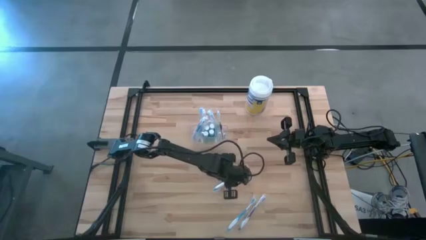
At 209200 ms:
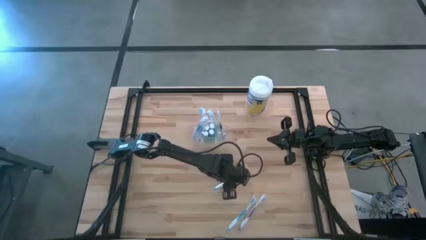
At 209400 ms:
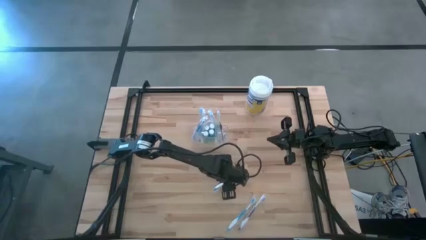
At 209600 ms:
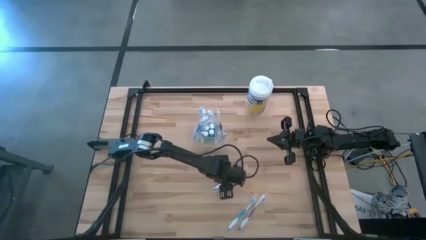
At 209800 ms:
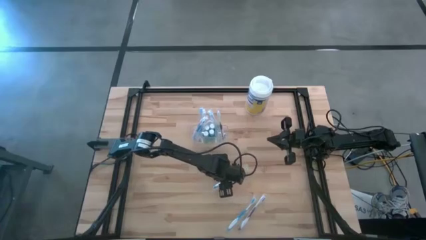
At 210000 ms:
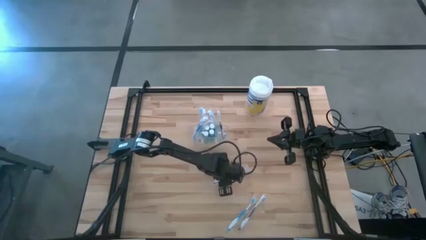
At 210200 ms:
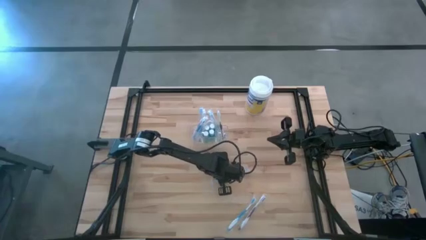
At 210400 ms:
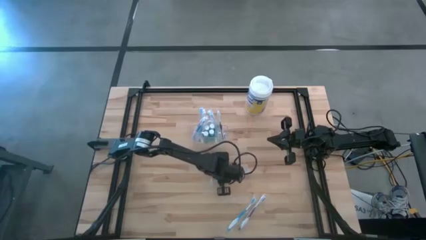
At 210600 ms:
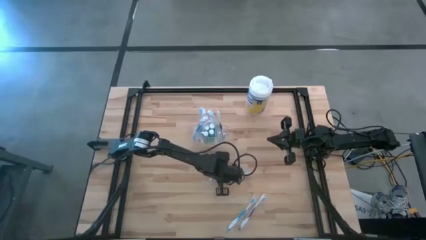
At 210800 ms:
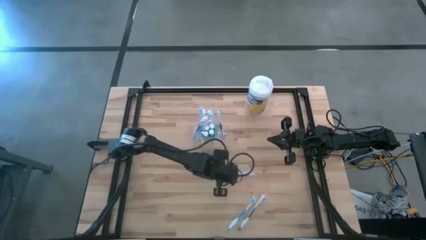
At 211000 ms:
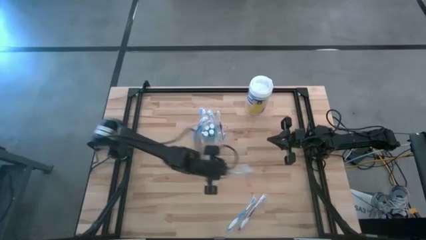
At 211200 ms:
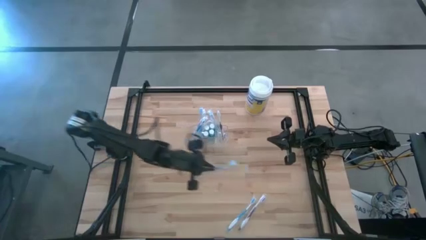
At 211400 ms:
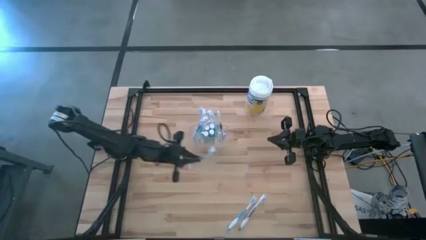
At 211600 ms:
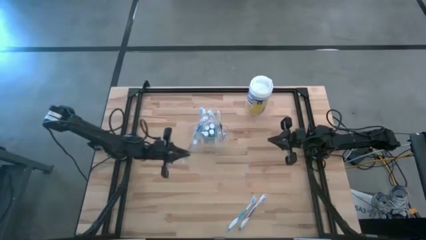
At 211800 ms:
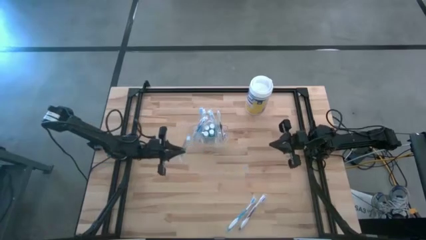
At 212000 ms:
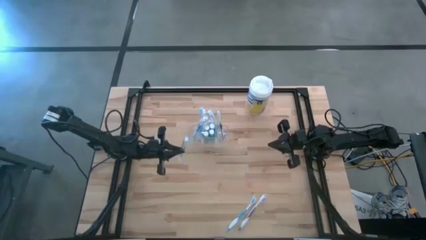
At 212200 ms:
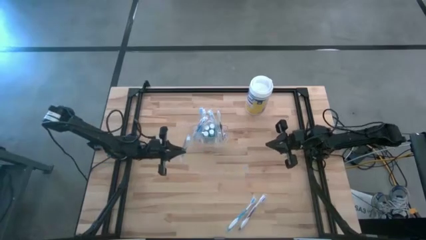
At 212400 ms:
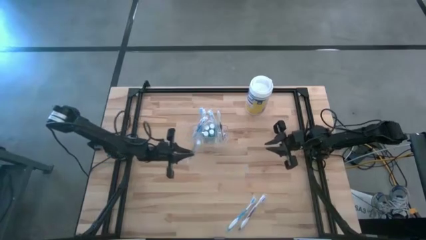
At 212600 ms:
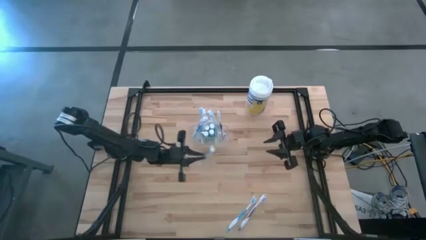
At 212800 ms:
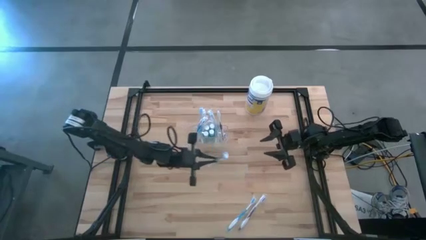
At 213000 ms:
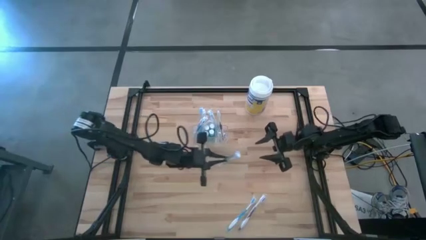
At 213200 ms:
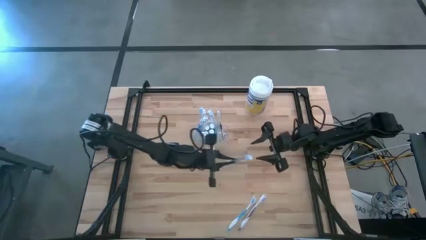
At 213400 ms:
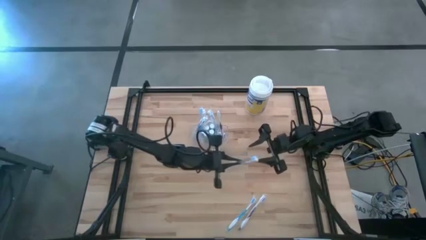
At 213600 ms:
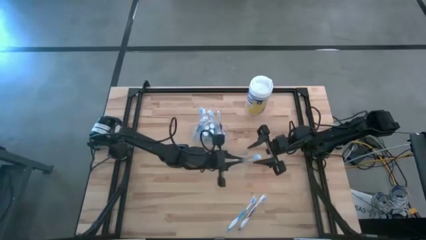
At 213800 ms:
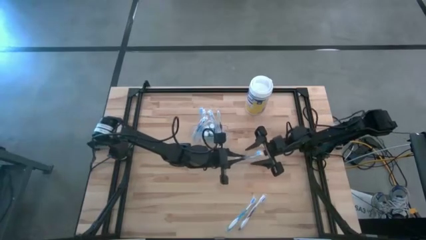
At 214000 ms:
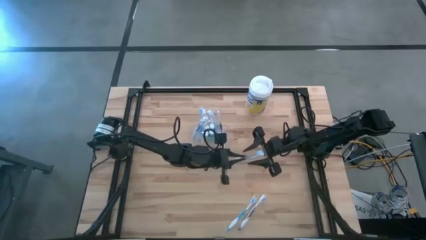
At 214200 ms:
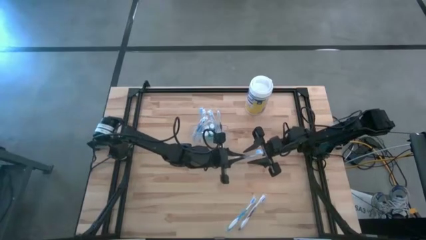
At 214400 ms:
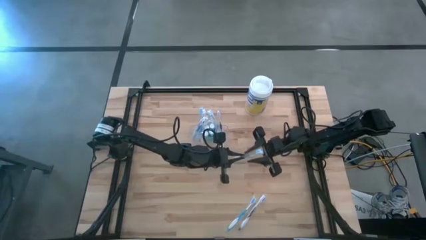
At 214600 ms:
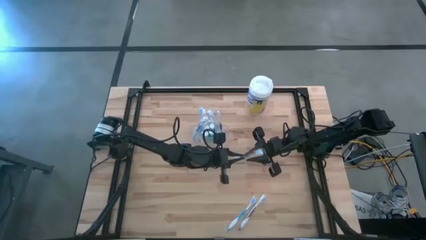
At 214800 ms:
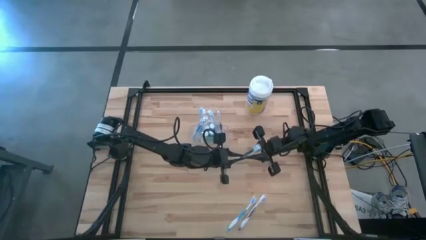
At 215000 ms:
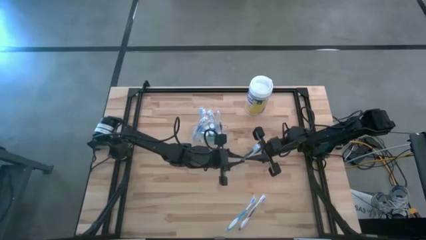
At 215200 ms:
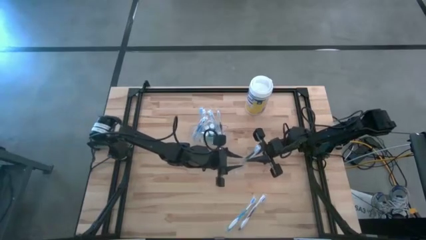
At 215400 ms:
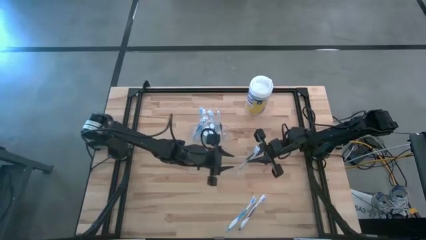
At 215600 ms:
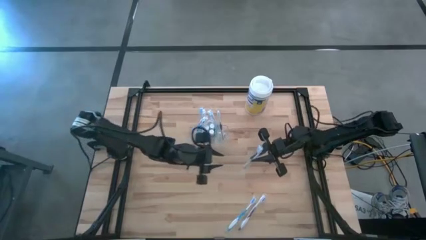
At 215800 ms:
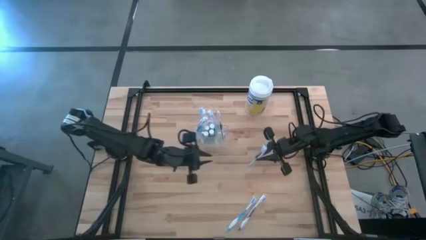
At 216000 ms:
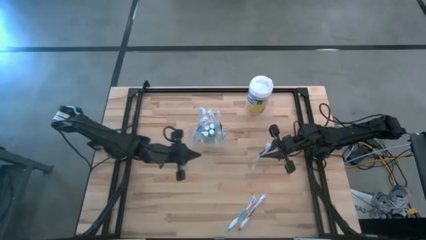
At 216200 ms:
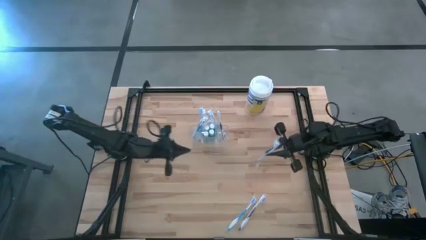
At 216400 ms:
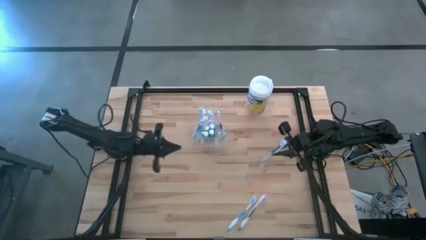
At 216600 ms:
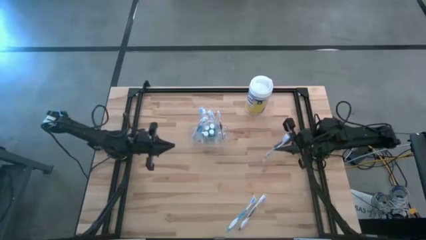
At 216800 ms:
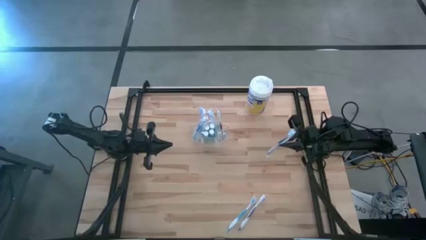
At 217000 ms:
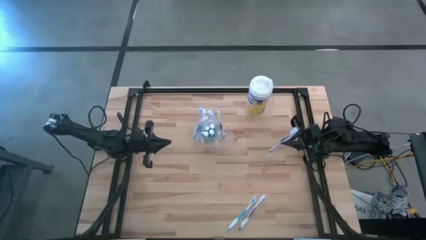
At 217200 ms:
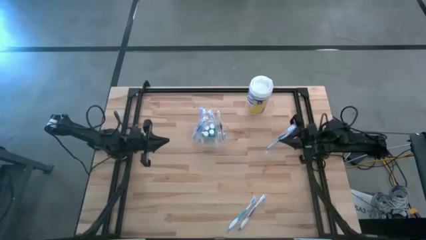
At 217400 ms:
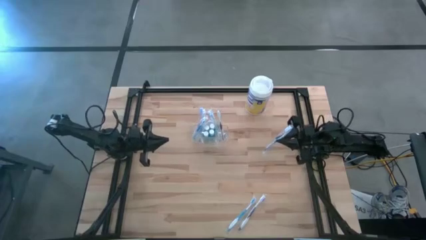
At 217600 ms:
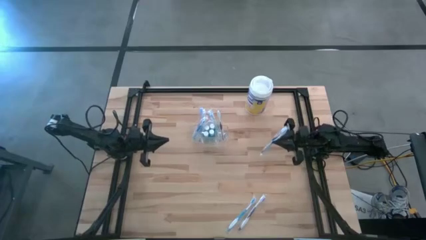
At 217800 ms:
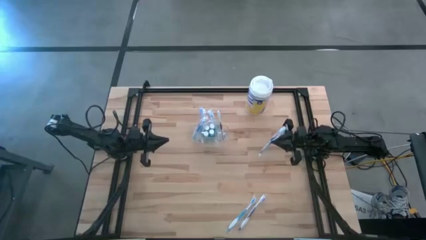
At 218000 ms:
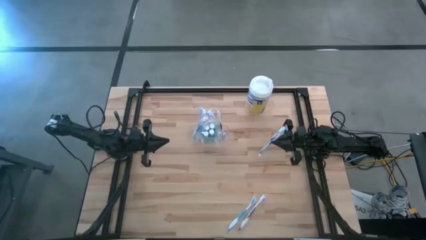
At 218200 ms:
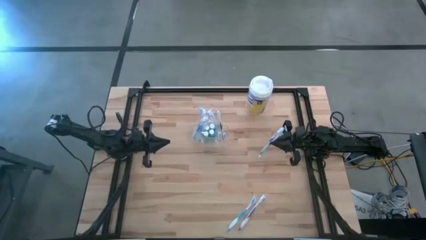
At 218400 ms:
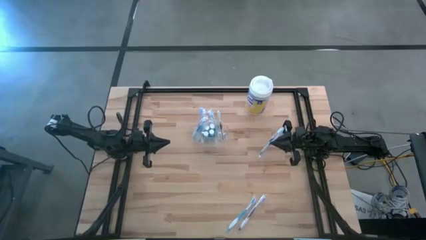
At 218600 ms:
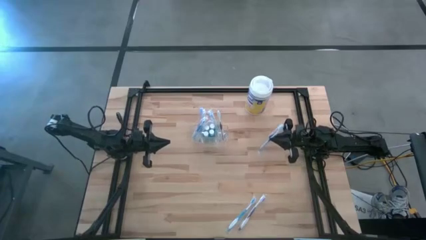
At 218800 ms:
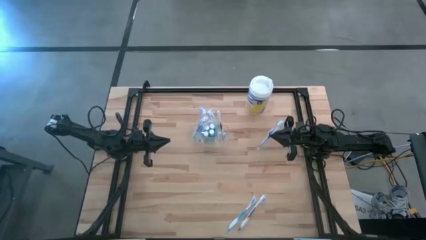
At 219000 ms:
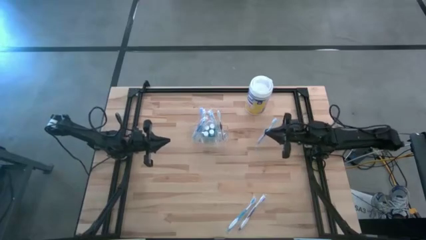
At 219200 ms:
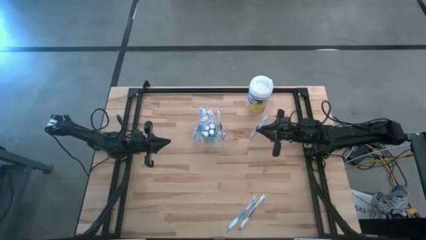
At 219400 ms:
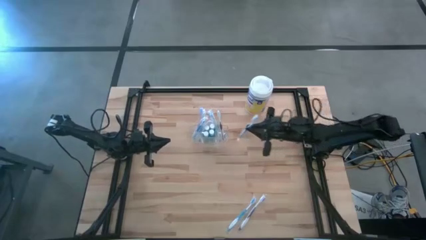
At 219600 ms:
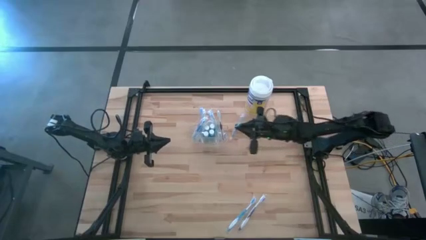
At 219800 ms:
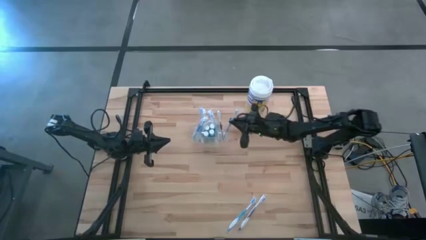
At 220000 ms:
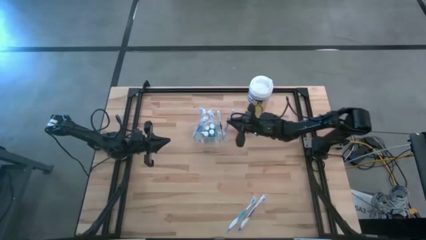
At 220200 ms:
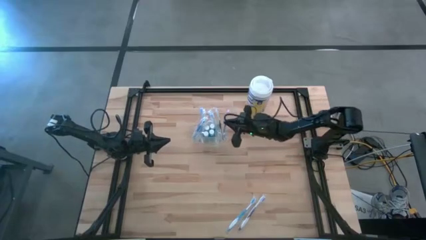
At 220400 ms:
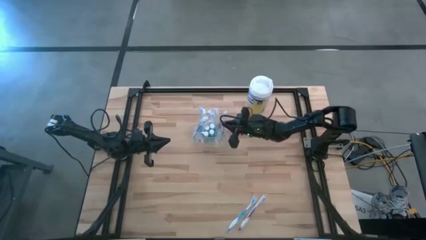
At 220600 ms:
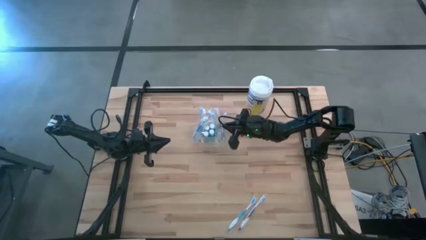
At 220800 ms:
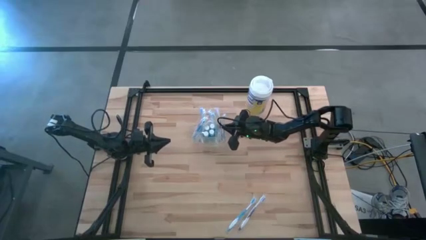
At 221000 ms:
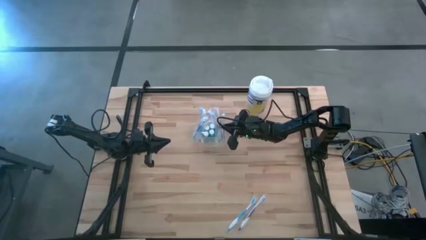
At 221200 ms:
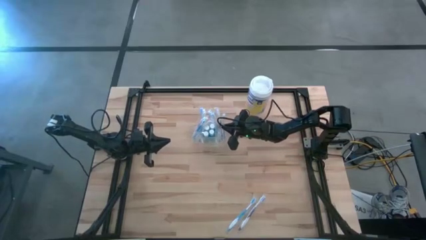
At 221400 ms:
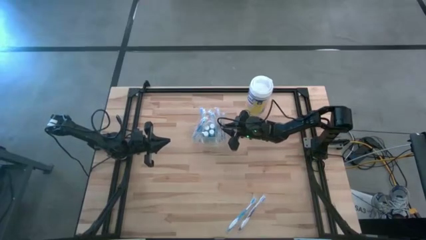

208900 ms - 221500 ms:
Task: Pick & Place toothbrushing station
Put the blue toothbrush into the transparent organizer

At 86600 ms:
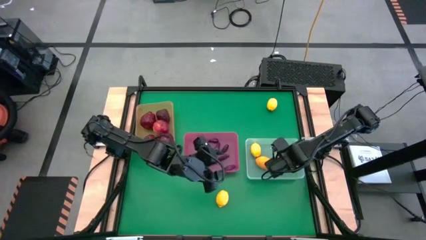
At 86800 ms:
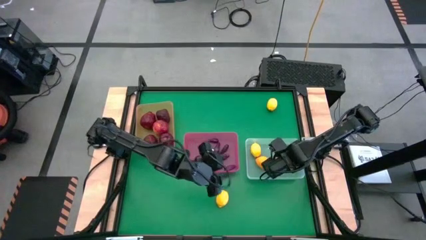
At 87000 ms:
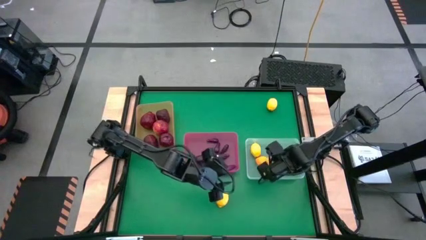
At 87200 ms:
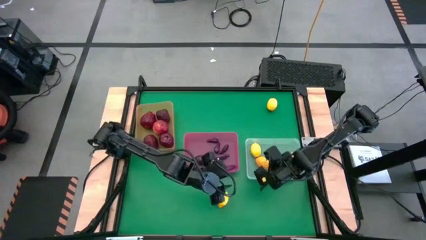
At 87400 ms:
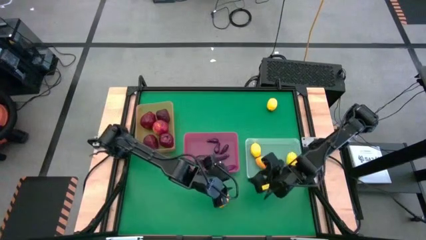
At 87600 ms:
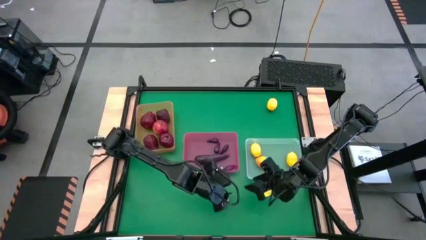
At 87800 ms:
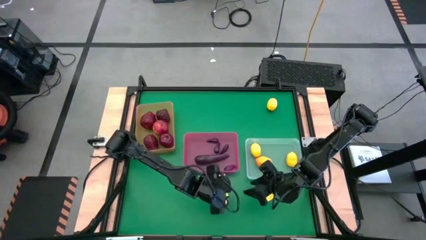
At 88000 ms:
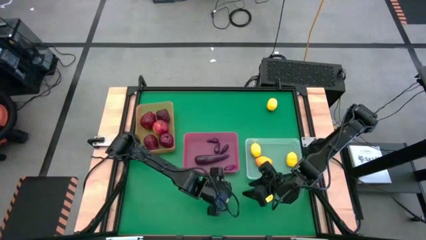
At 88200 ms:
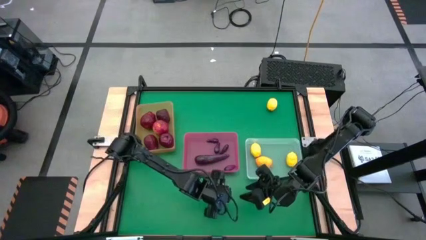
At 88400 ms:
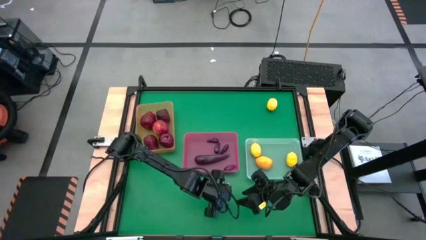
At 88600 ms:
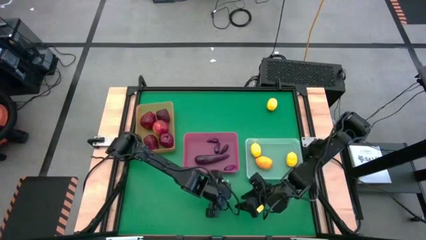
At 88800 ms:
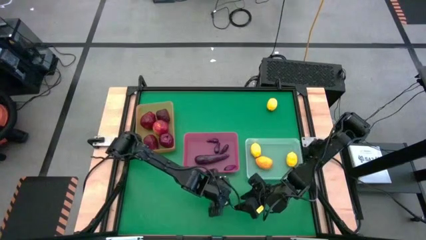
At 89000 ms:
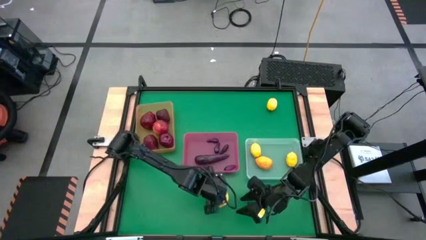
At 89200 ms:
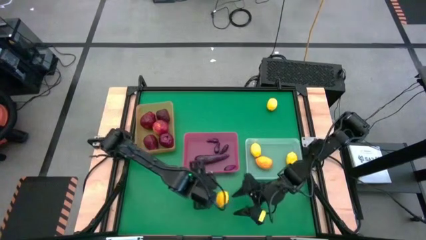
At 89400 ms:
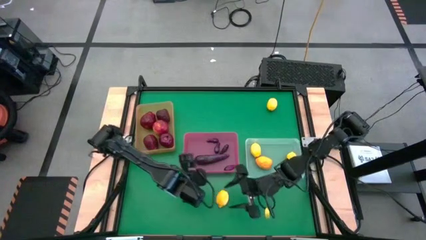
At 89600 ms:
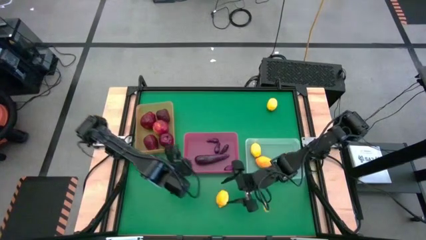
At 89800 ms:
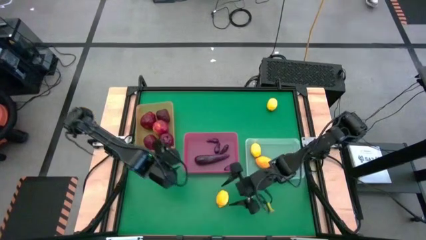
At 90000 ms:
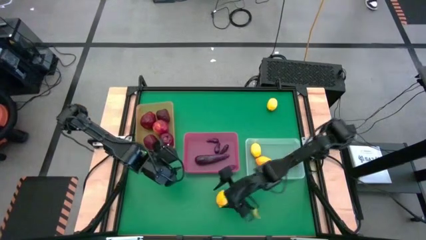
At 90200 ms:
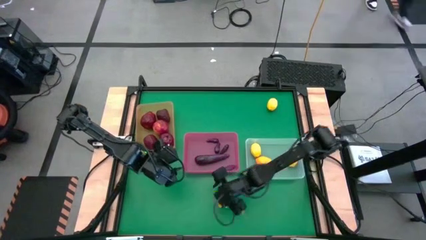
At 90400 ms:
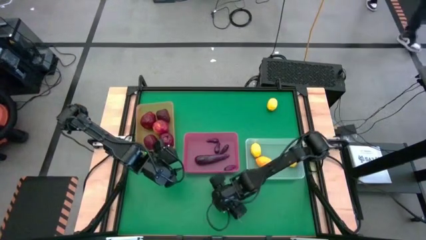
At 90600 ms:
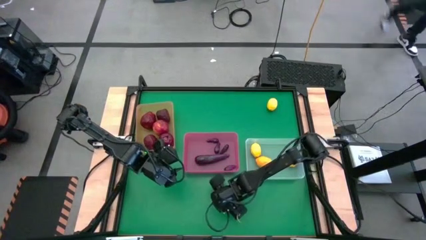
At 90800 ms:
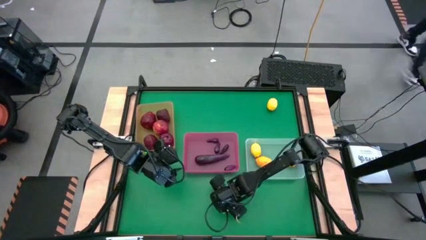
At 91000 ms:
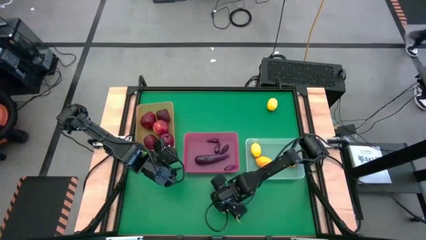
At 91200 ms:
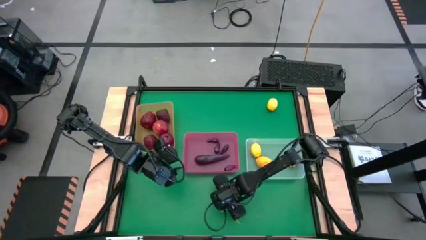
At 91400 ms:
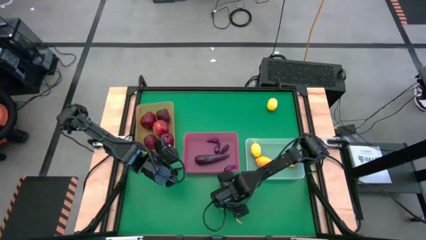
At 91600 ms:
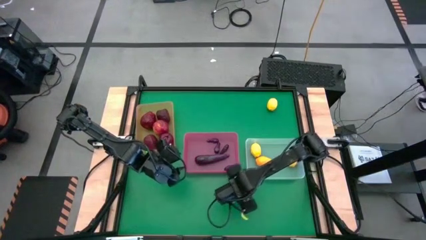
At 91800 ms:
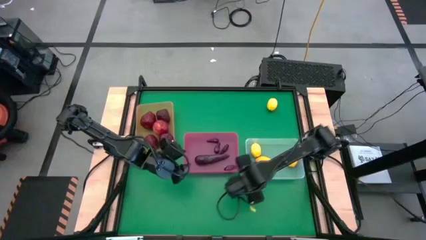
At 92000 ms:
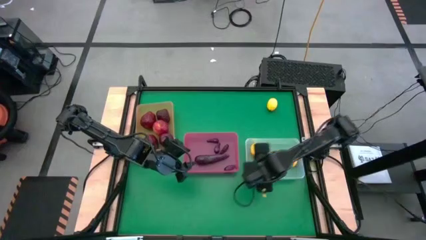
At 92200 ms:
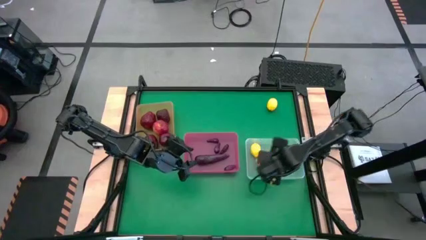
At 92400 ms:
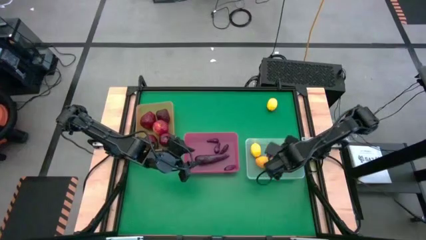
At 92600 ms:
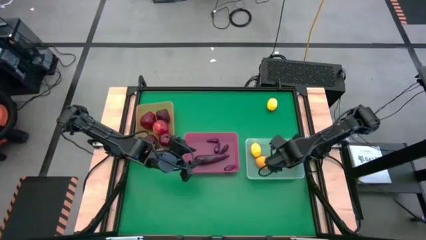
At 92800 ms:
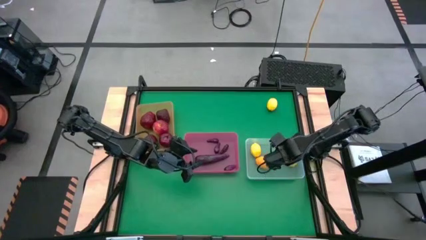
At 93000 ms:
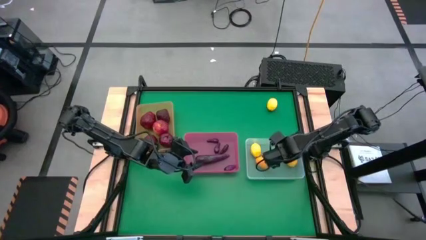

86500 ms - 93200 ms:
Task: Sort produce into baskets
Put the yellow lemon into the transparent bin
